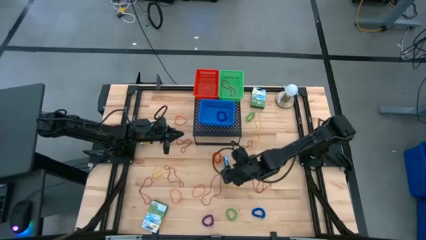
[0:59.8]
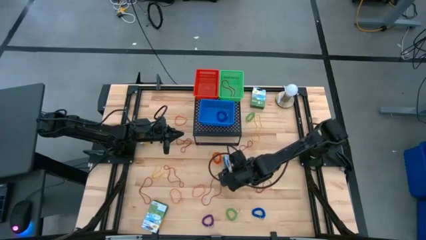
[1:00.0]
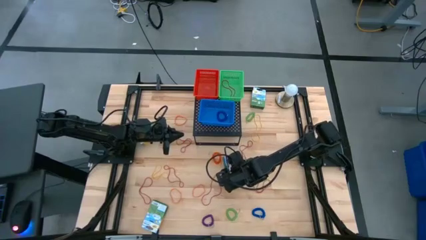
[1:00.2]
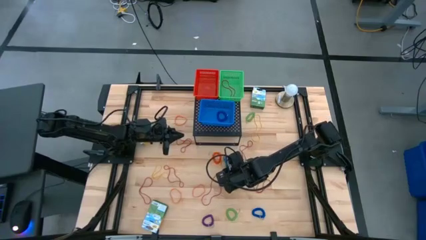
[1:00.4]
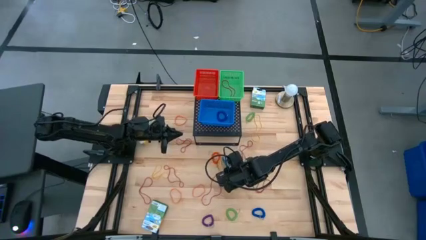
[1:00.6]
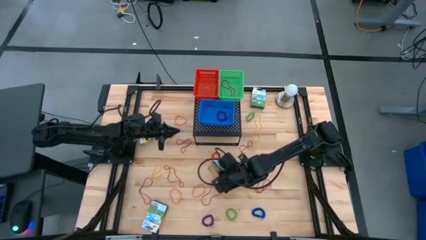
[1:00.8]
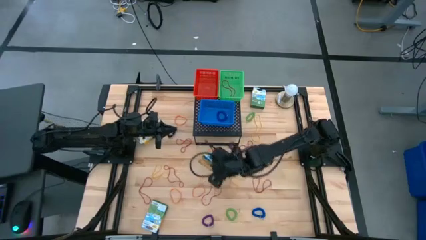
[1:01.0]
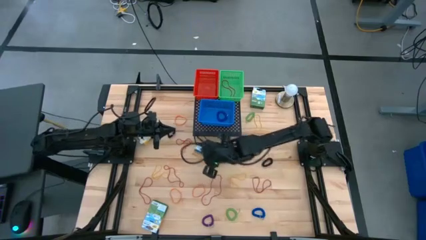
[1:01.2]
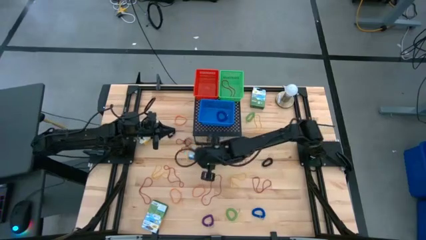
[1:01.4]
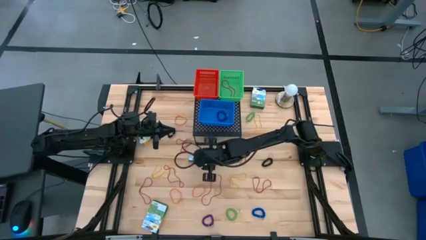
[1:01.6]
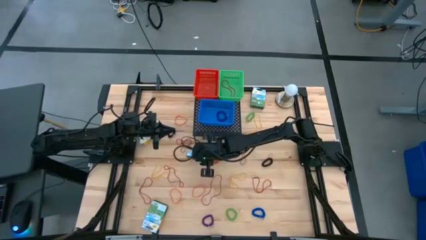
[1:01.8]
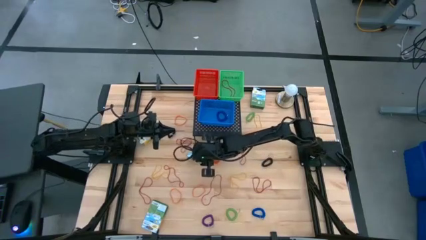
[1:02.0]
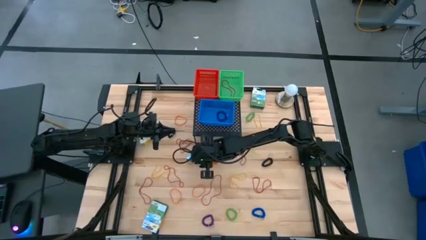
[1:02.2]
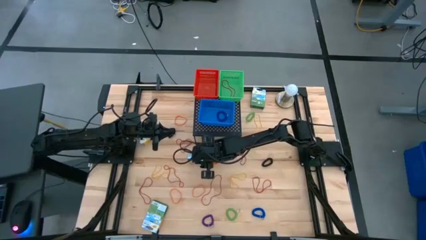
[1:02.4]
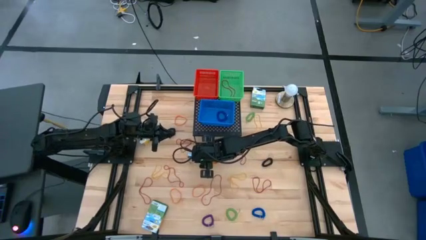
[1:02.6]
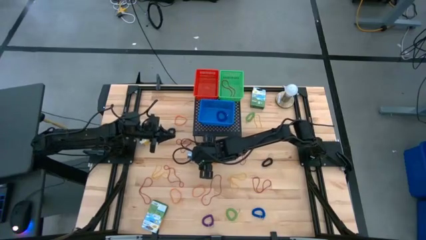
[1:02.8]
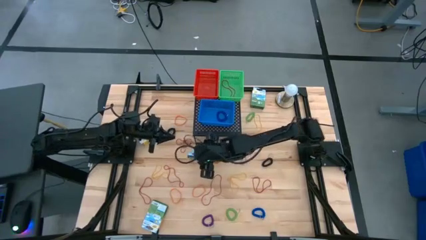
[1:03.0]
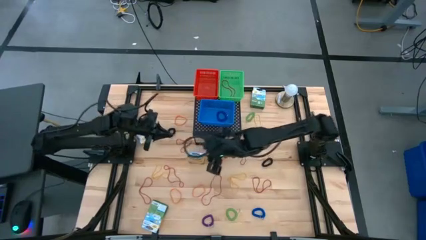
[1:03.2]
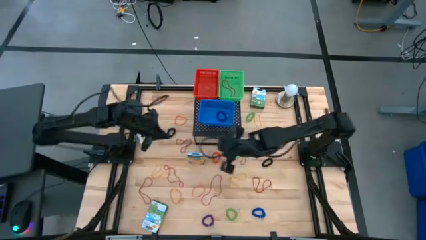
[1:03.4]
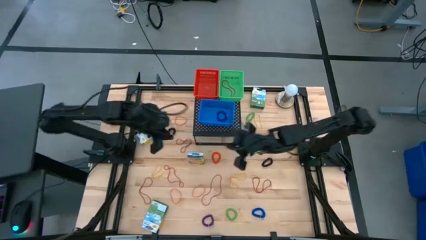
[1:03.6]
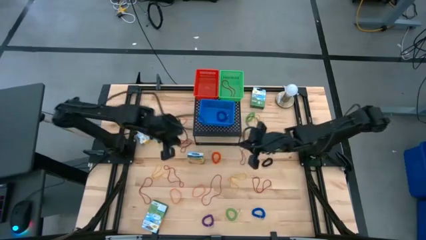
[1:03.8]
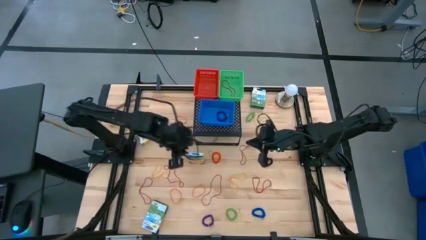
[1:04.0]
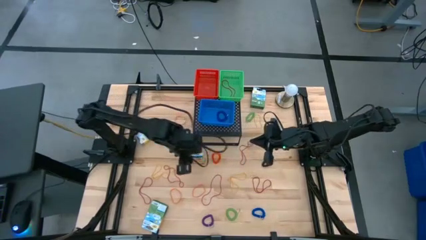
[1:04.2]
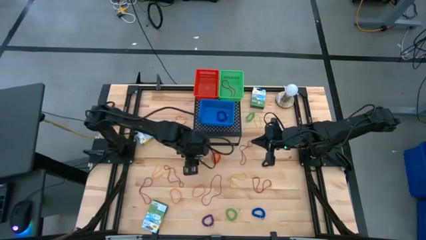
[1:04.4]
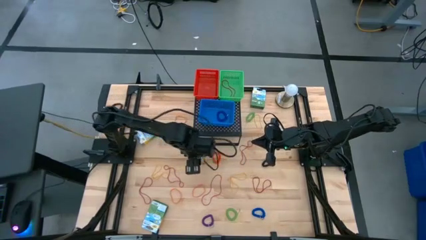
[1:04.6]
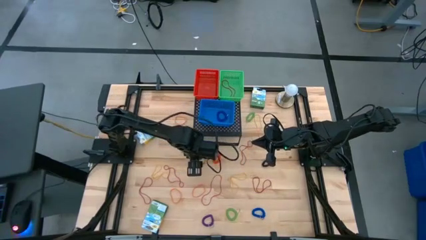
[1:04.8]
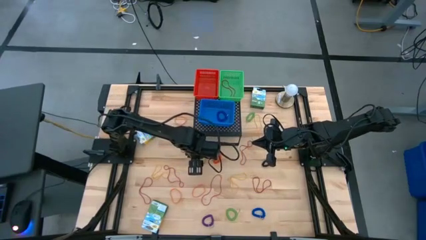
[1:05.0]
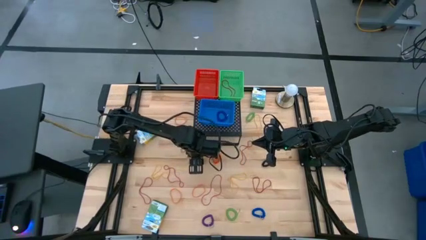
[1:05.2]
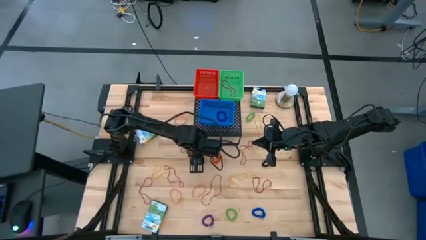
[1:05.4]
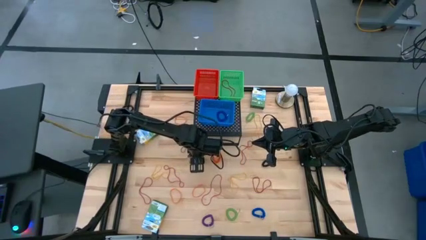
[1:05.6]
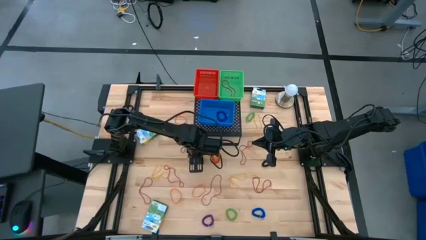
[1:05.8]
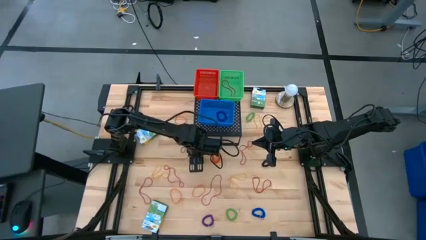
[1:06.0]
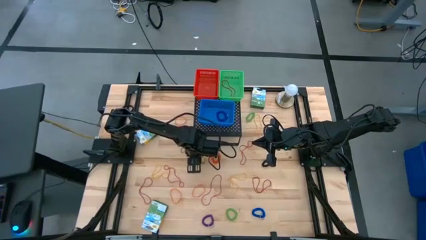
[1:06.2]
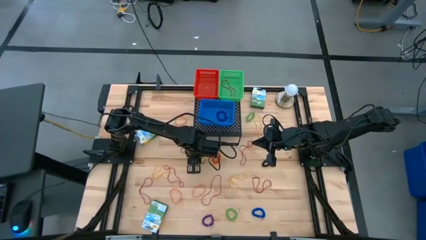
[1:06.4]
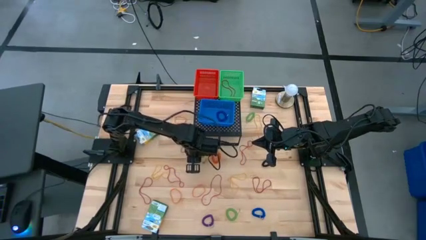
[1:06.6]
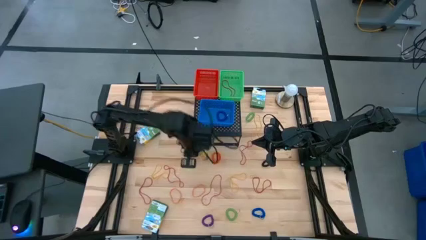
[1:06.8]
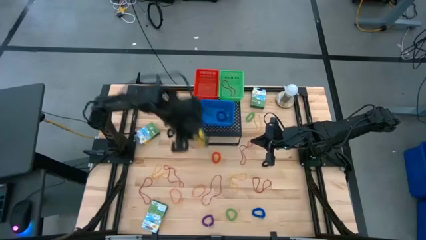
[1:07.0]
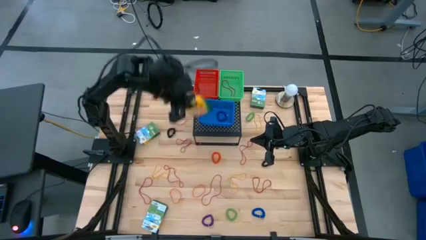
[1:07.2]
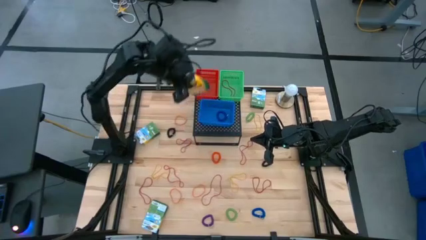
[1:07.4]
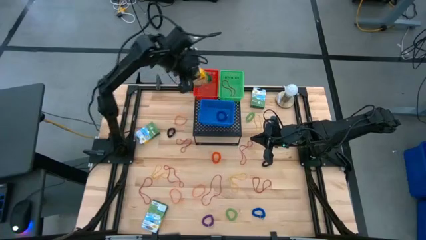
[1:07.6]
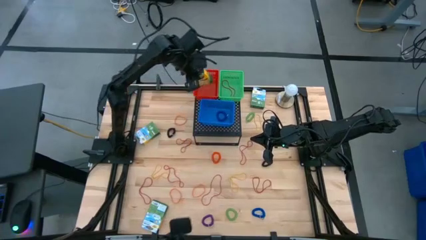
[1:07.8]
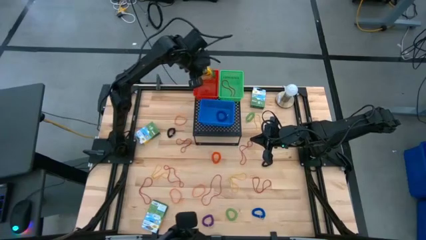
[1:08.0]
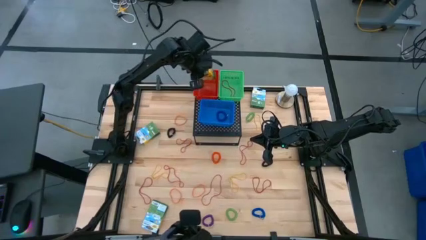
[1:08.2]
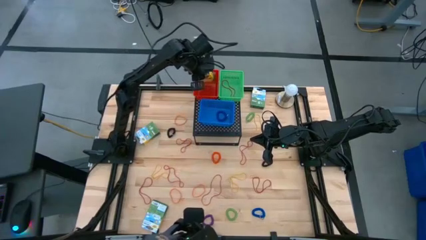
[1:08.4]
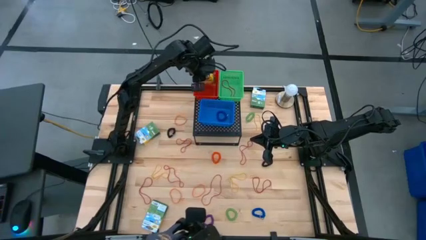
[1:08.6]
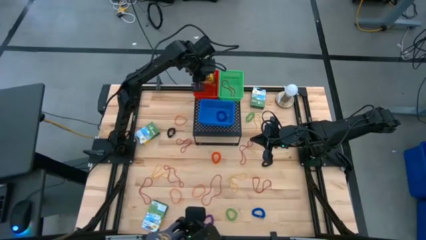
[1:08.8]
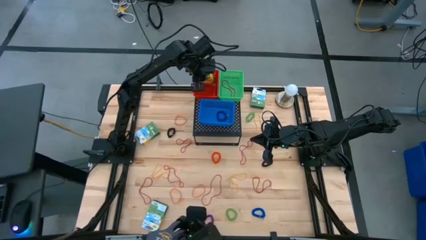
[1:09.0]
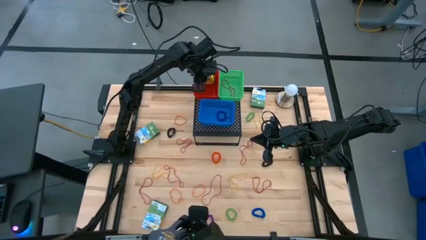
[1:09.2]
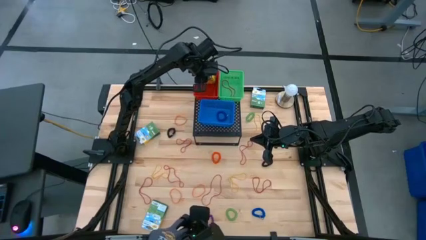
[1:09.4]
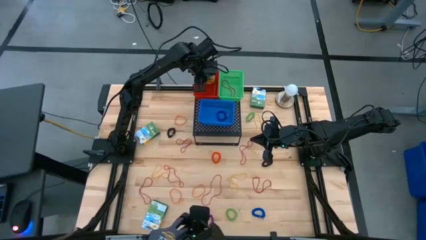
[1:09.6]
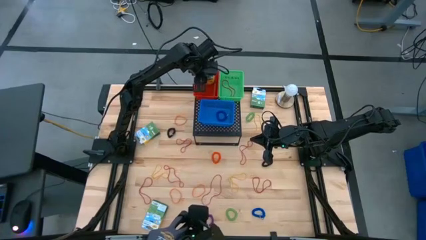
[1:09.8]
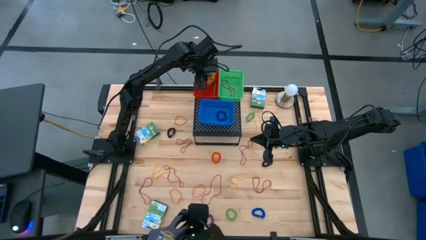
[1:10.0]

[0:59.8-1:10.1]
Task: Pick & Place Office Desk Supplies
Put the yellow crayon box into the red bin on the shelf

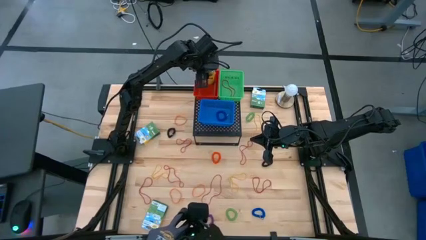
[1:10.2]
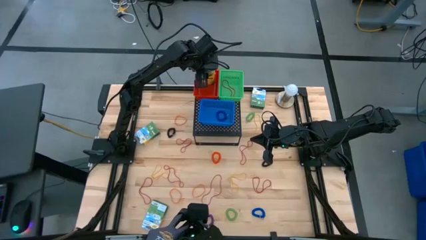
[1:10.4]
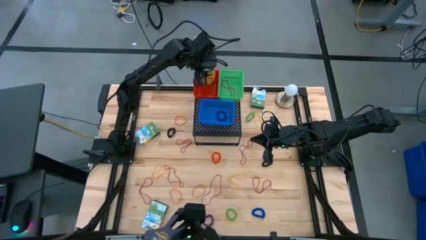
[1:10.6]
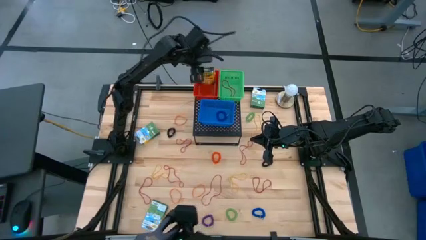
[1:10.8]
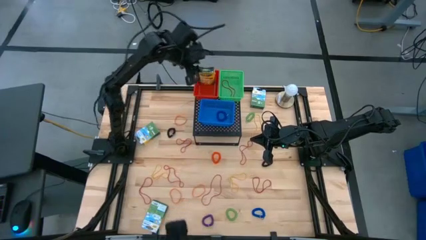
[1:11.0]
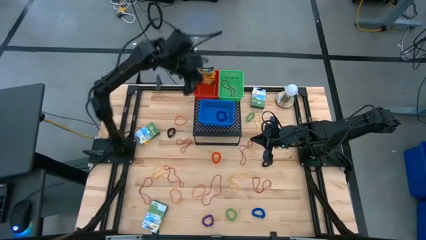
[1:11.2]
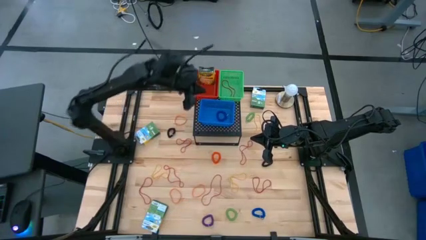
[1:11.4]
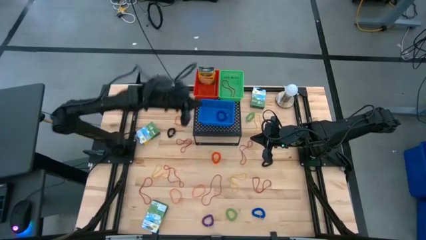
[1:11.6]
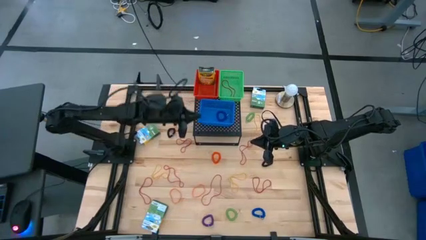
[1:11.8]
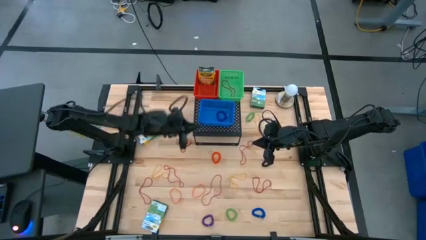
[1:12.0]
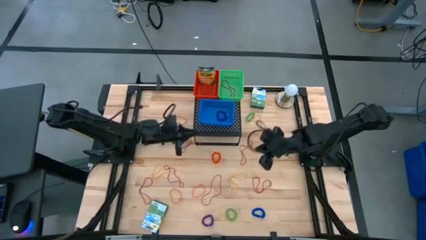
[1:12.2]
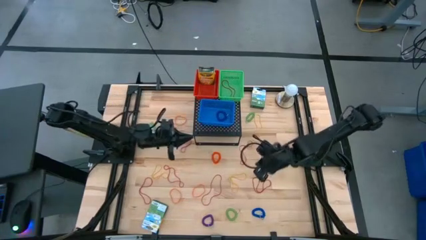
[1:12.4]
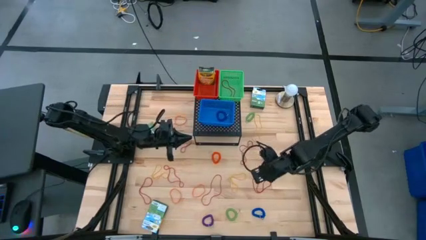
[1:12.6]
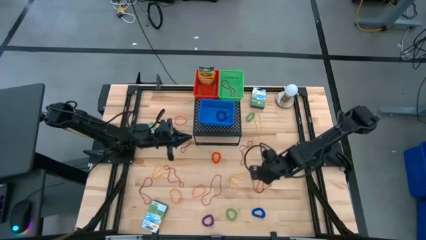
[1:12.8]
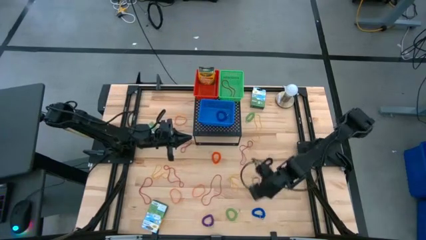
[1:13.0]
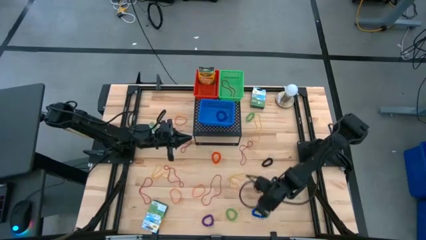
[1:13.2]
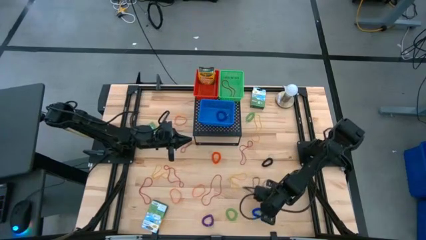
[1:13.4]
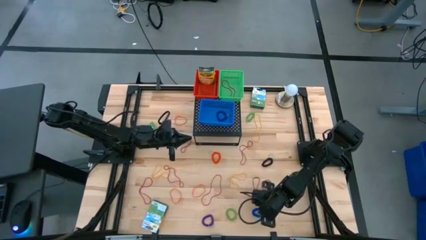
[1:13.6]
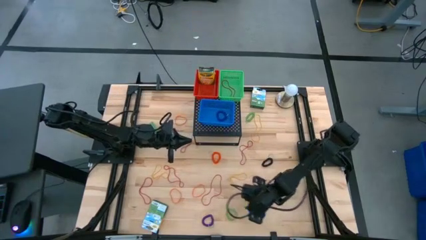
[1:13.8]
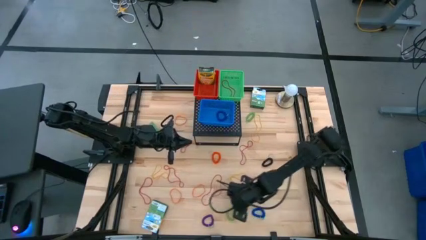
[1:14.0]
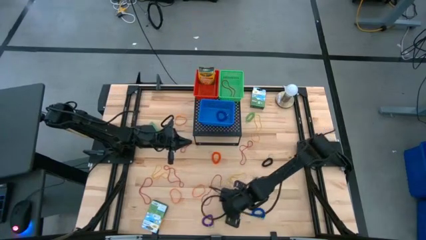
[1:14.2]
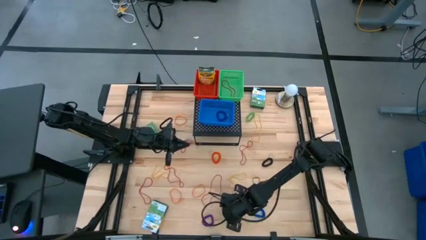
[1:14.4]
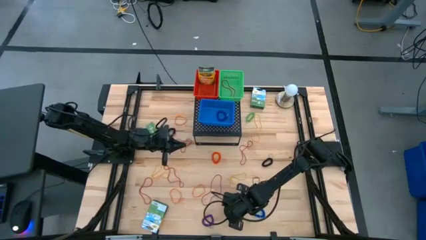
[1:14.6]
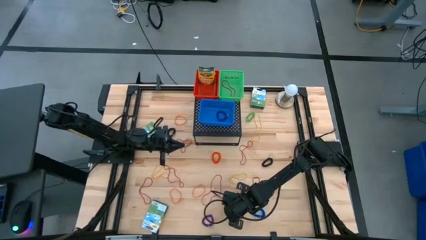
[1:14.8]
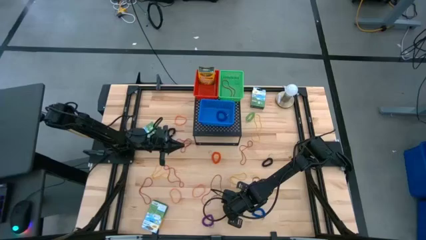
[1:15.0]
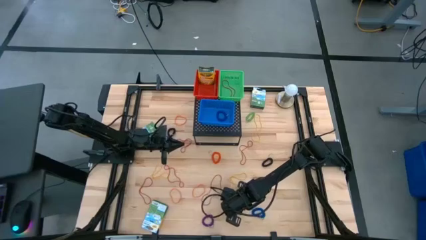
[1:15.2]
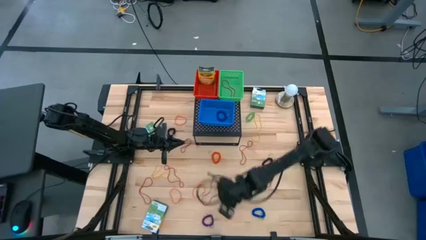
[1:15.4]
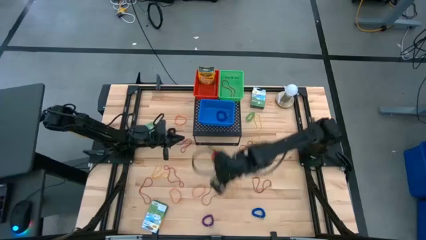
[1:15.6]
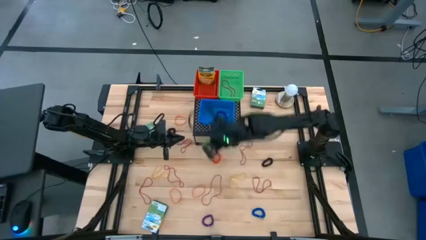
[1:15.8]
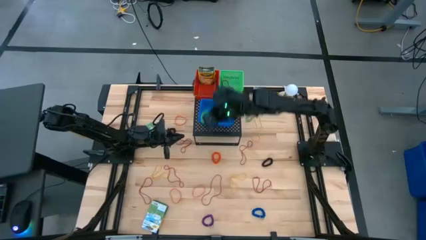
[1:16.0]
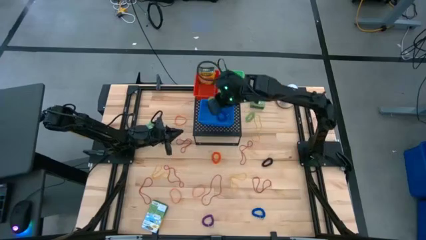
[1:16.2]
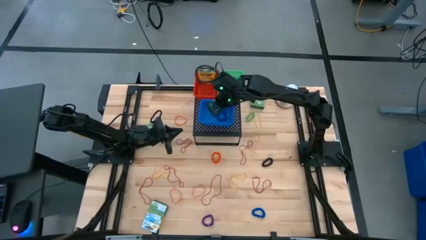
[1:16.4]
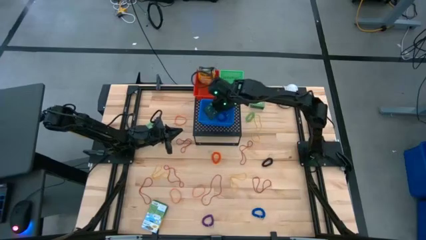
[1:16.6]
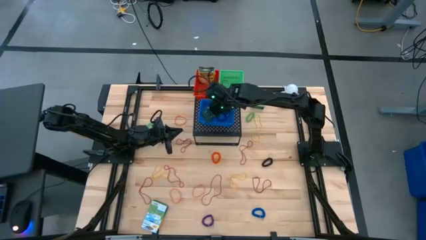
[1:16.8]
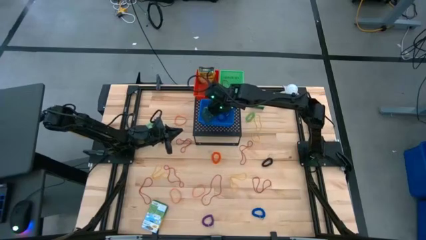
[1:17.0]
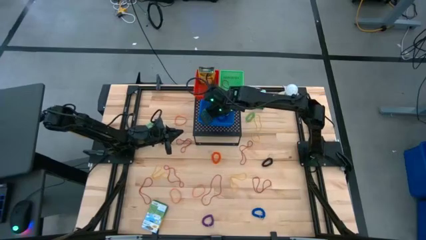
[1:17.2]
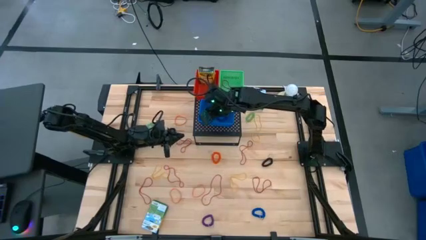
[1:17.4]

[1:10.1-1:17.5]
Put the green spring keychain into the blue bin on the shelf
